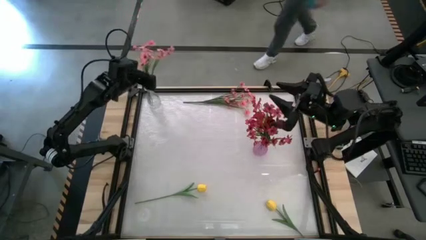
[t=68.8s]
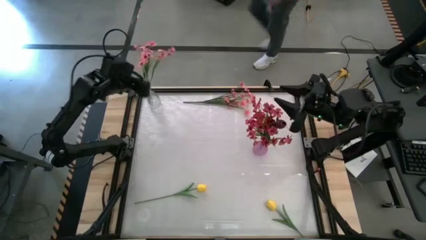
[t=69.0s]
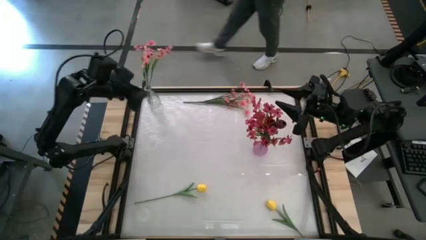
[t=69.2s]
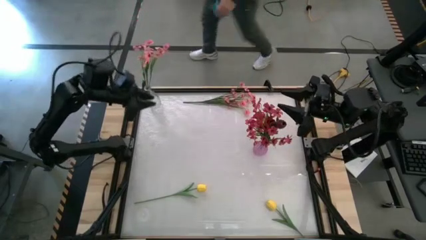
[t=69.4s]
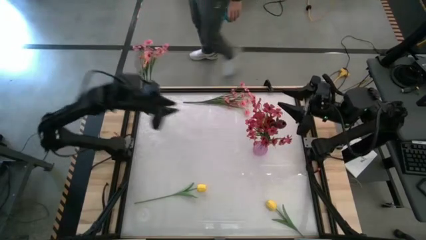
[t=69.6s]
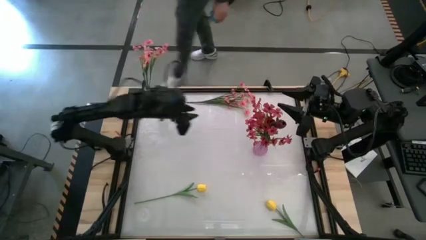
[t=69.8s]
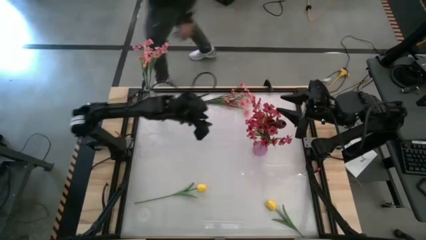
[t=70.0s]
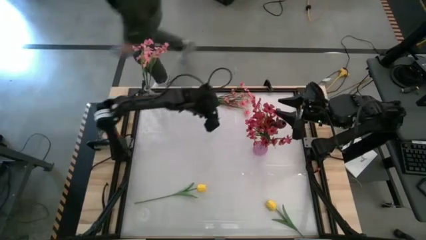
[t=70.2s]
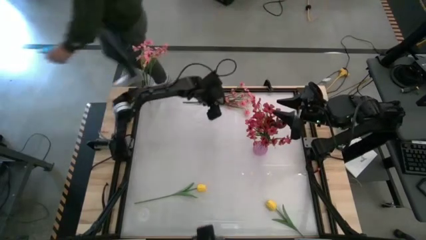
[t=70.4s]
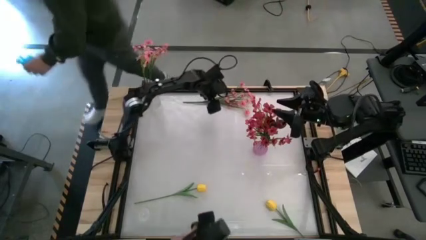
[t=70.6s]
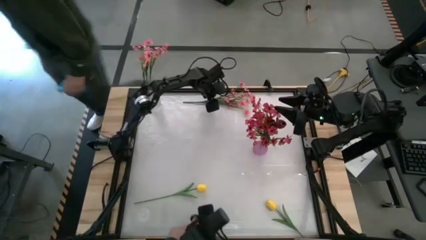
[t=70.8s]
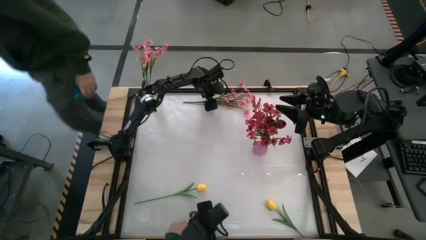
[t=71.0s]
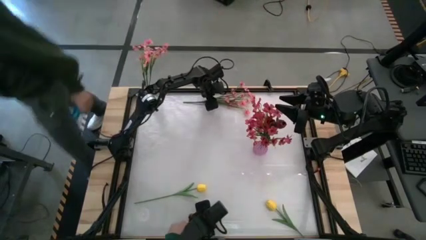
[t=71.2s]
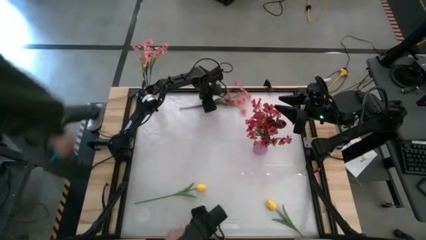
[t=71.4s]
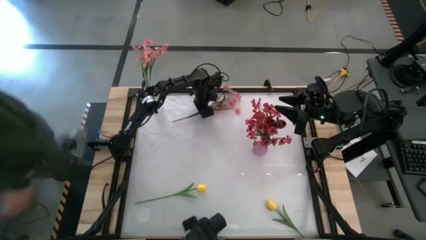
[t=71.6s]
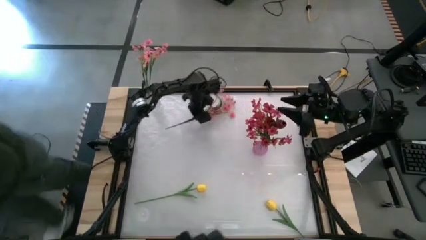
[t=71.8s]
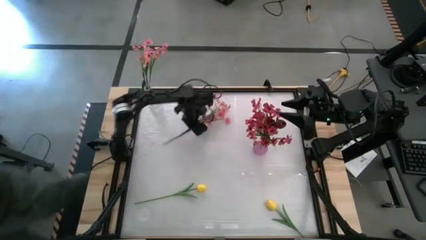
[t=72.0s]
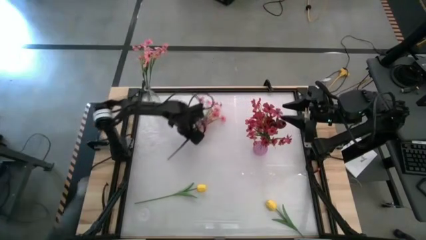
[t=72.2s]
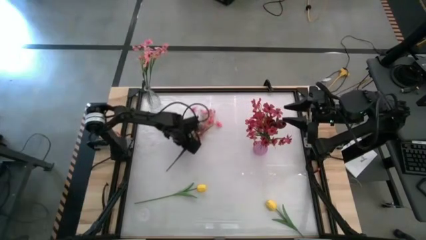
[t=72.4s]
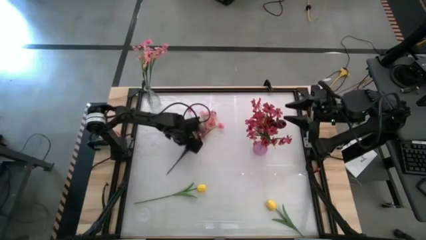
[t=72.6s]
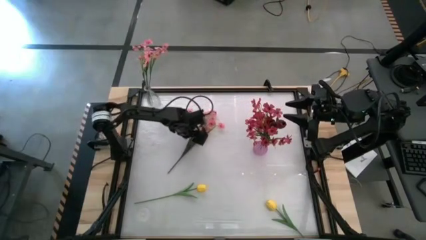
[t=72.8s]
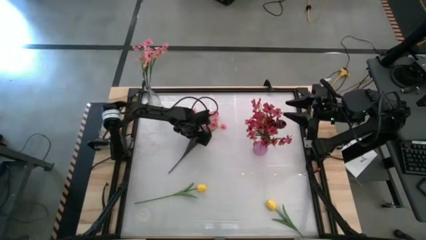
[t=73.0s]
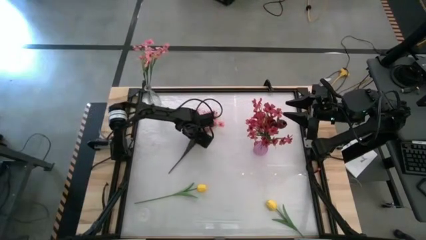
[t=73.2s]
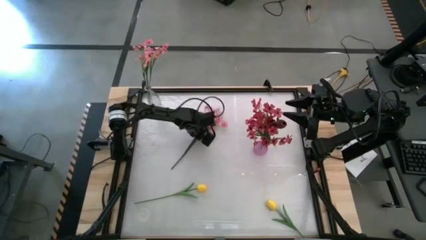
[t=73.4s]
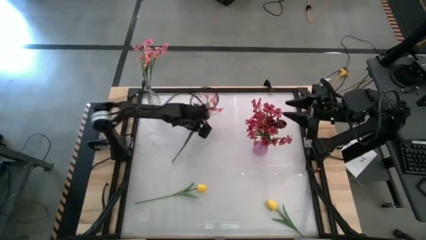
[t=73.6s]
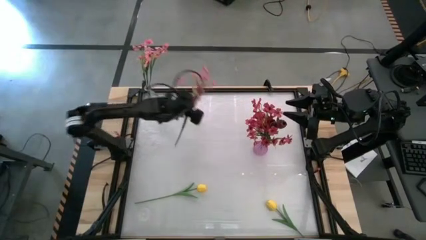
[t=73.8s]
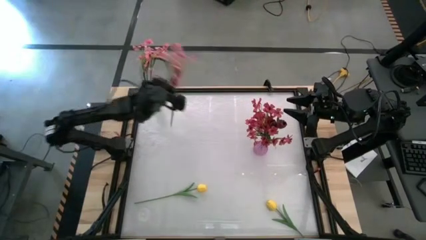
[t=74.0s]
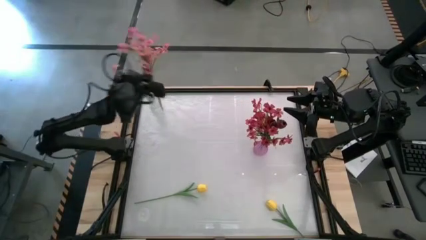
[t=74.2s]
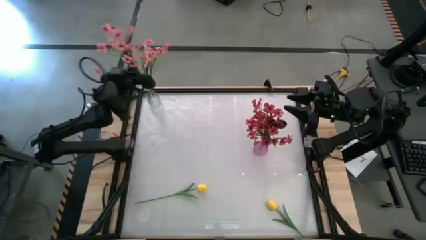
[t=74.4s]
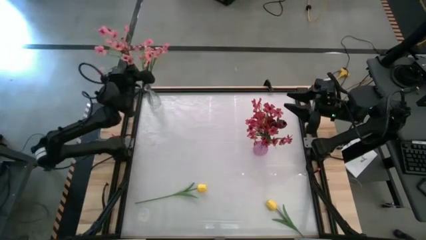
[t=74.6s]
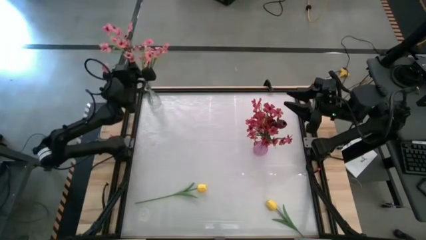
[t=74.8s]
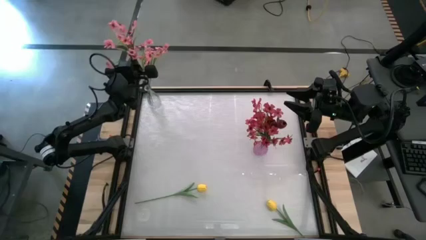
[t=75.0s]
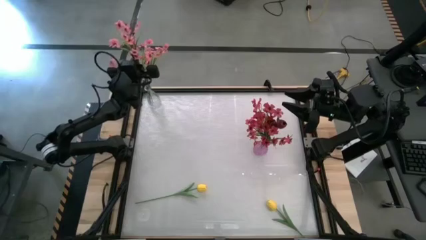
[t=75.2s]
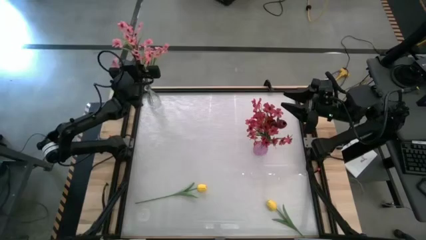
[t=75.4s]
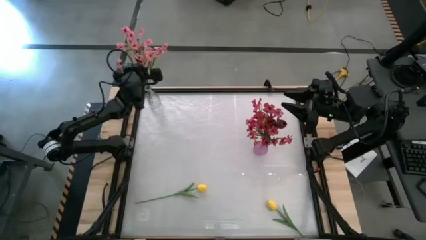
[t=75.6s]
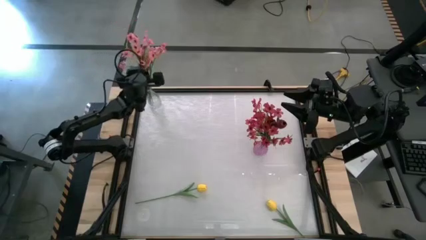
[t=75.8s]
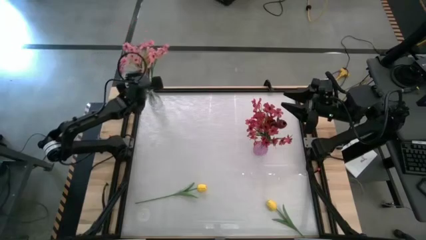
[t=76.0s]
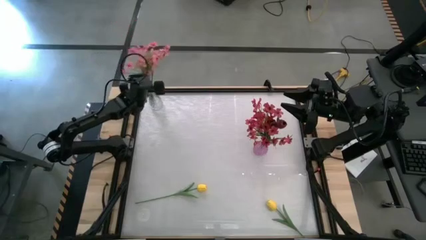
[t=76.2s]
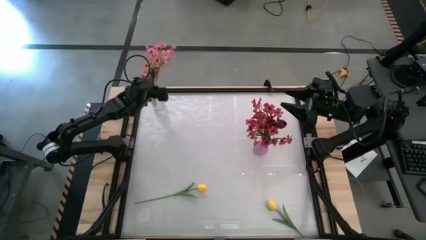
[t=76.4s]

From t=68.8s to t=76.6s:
Task: Sort flowers into vase by color
Put the pink flowers into the transparent vase

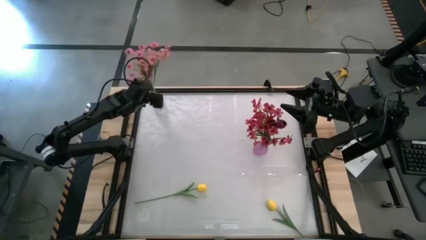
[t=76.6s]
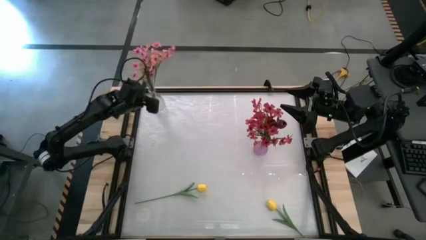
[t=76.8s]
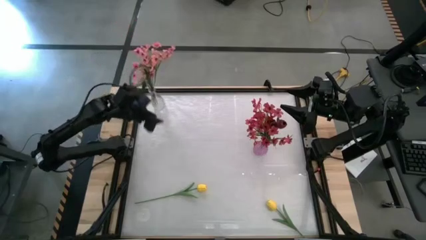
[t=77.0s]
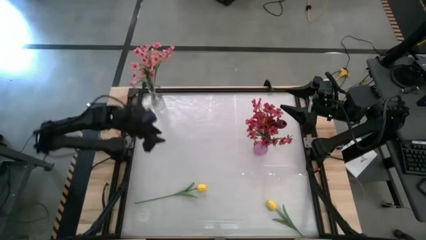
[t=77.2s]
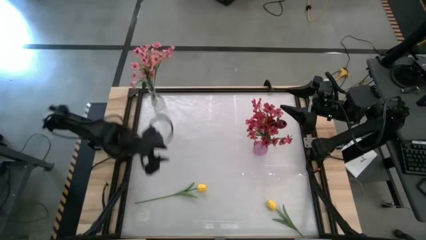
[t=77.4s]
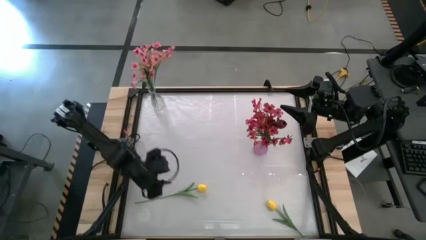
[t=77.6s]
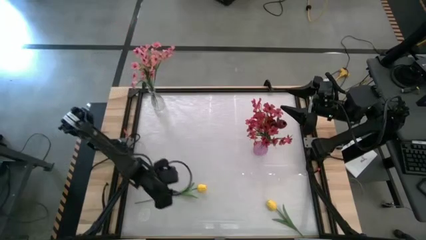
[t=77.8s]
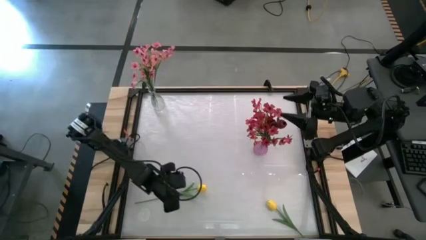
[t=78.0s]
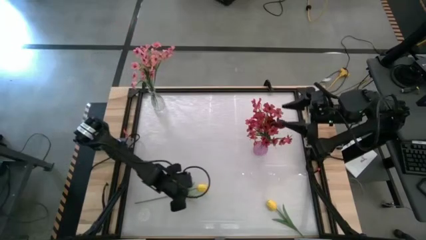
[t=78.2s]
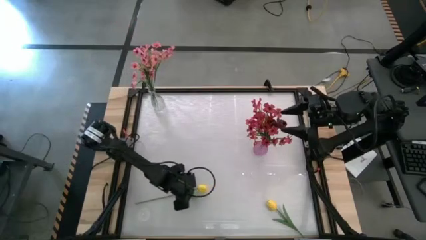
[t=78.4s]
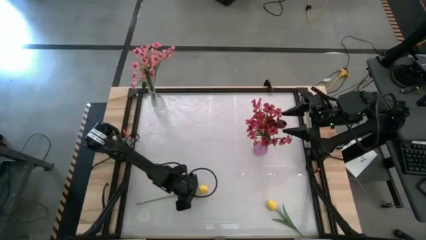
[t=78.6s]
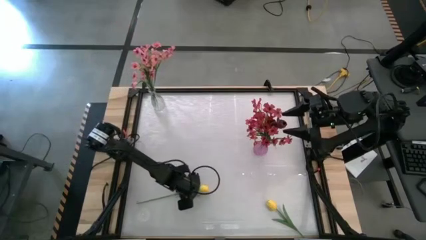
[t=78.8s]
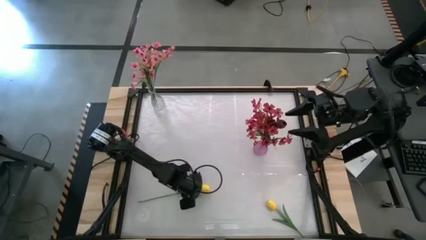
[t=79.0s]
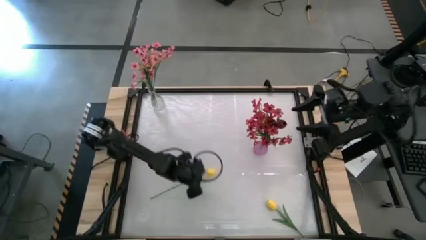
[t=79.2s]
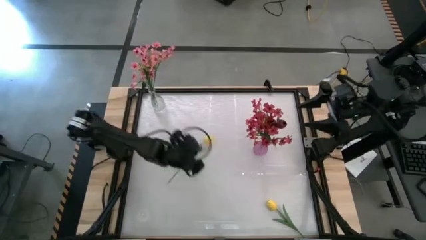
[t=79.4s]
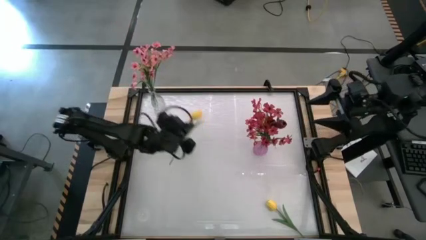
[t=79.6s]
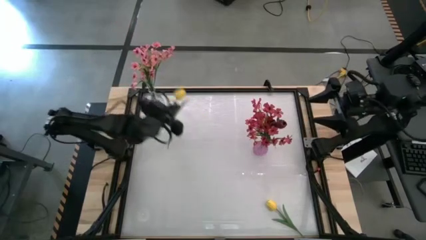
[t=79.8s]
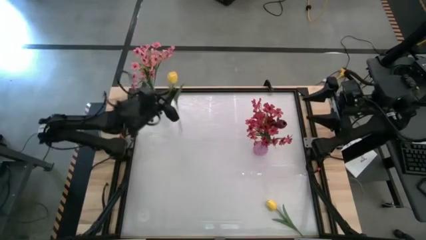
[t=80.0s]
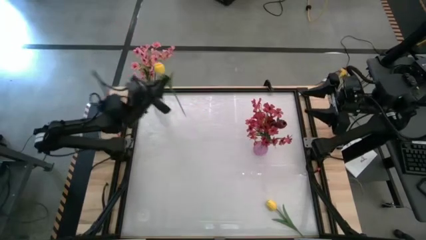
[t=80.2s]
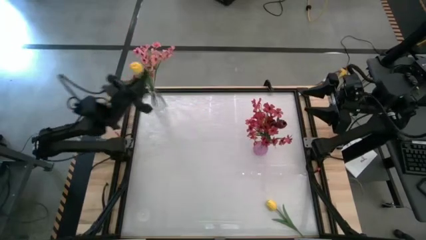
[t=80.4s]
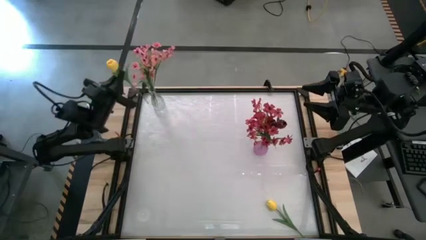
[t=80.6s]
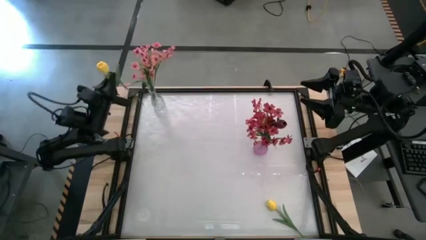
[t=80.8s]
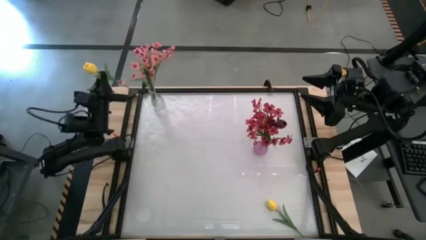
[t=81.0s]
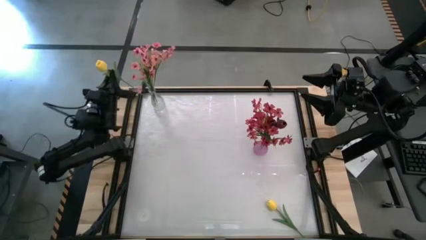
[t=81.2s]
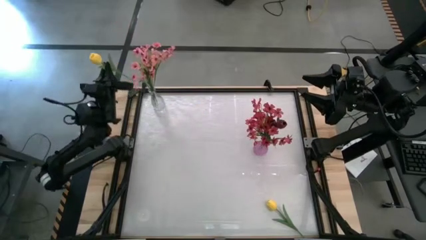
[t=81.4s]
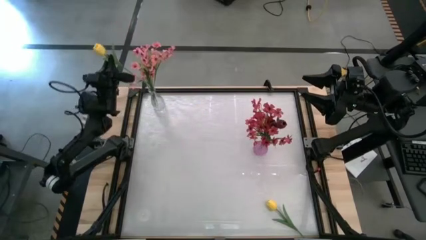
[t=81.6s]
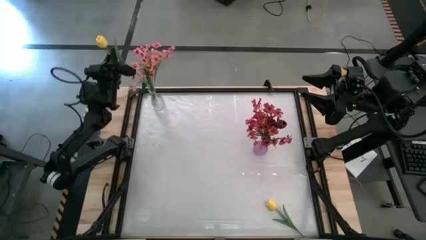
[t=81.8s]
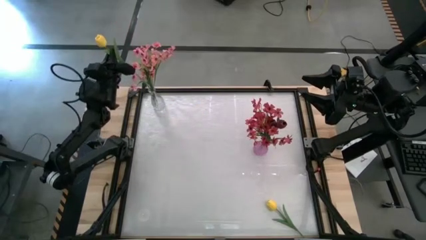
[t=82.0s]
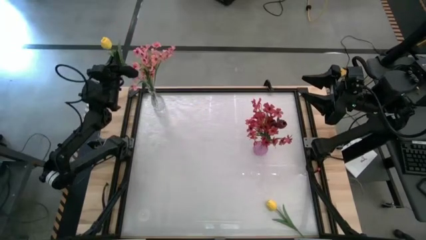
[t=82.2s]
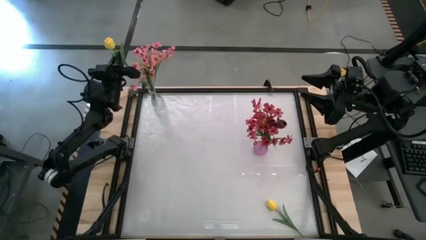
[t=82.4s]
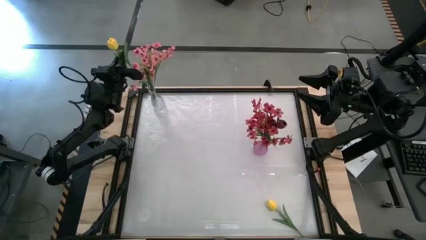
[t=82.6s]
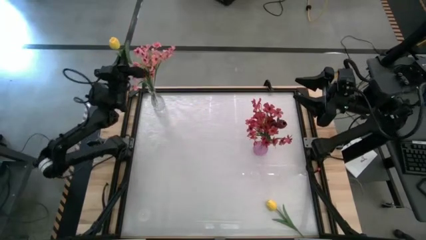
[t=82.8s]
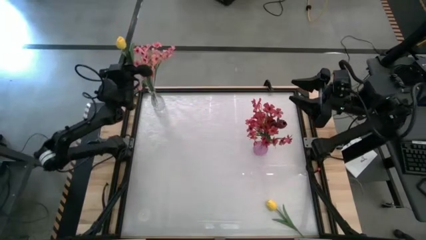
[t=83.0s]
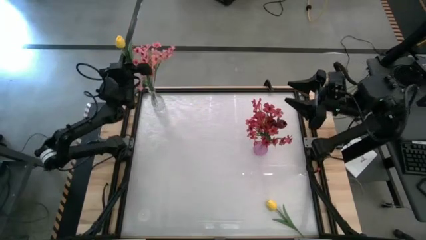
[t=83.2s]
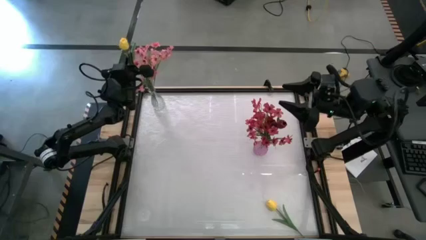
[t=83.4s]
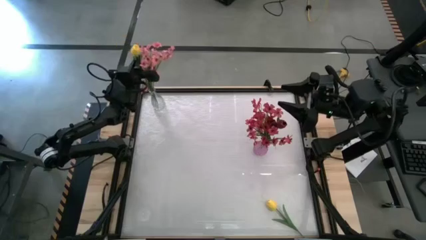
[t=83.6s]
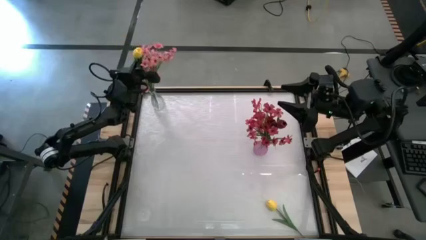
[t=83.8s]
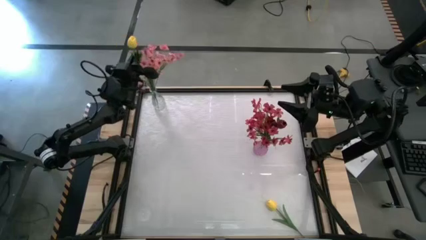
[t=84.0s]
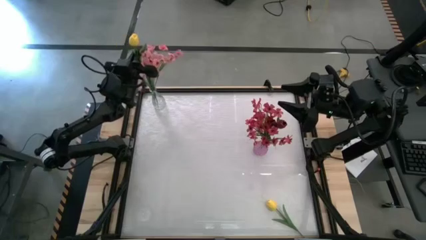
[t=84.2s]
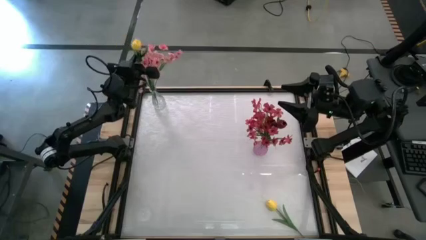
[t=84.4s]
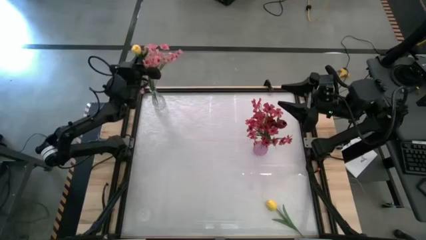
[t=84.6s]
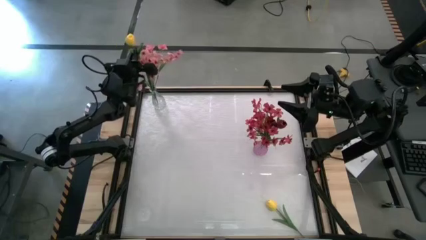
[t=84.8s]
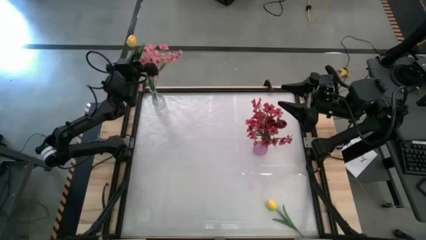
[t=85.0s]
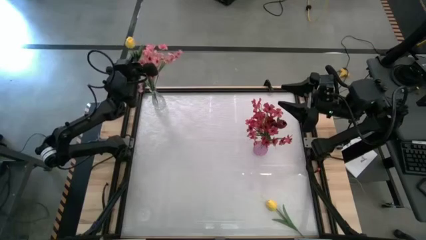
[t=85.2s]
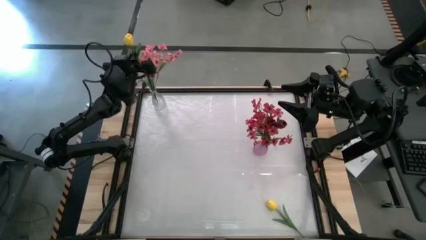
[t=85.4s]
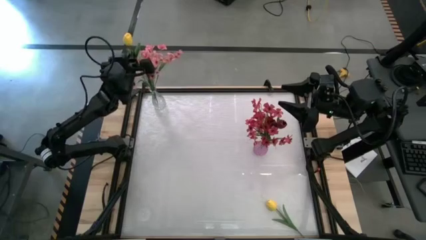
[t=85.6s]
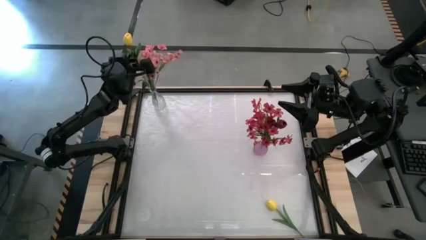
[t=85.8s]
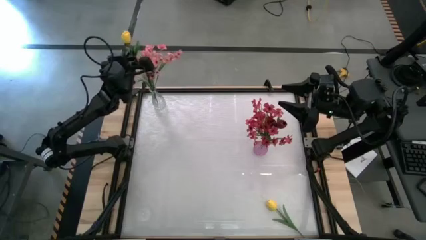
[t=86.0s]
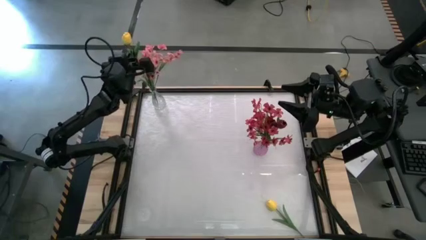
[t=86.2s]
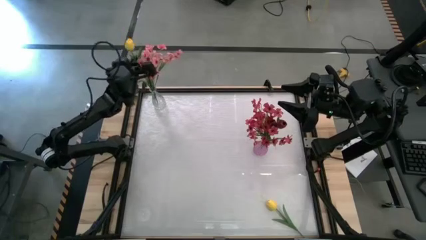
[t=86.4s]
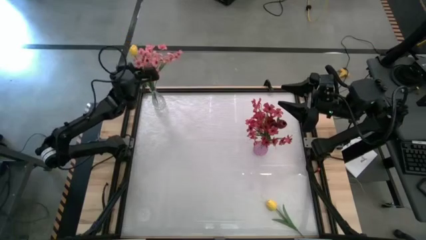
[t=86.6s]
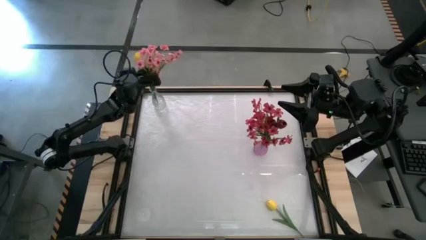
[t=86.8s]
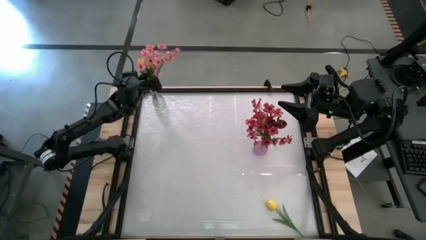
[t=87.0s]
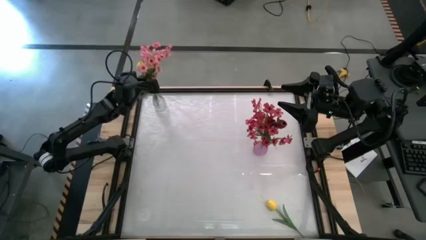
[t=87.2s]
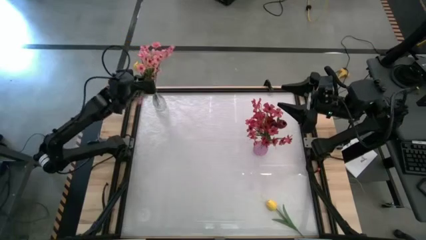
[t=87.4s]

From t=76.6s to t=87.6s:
Put the left yellow tulip into the transparent vase
